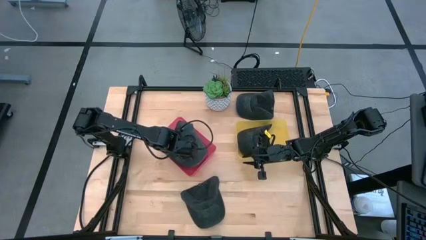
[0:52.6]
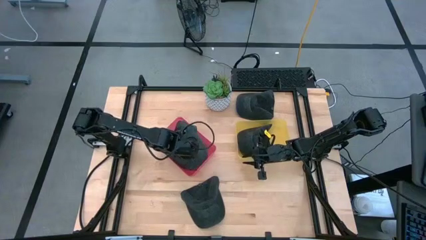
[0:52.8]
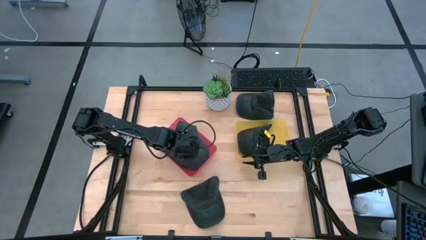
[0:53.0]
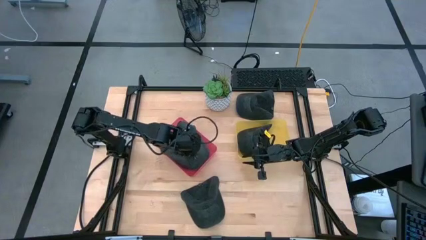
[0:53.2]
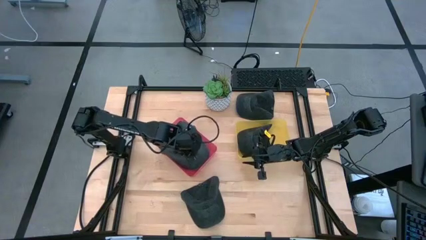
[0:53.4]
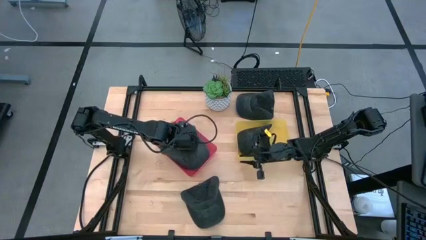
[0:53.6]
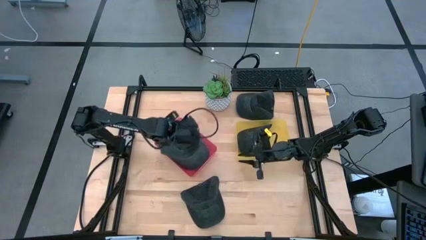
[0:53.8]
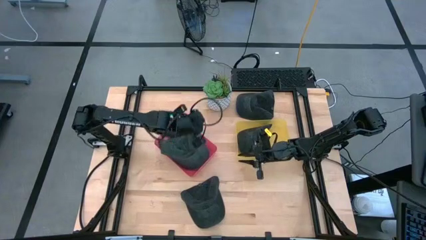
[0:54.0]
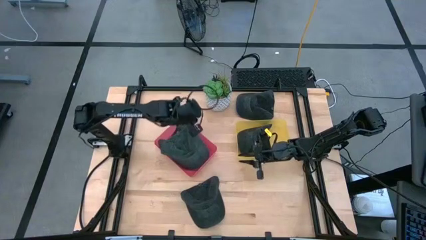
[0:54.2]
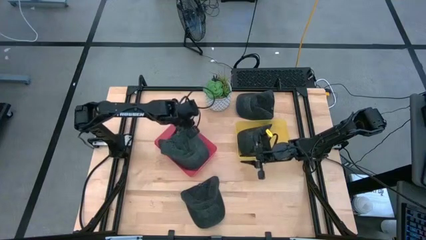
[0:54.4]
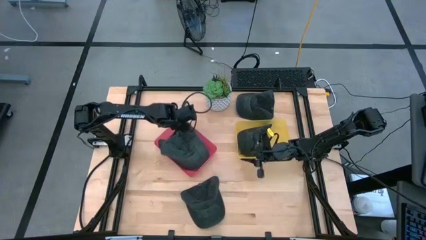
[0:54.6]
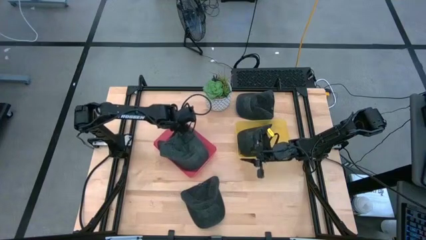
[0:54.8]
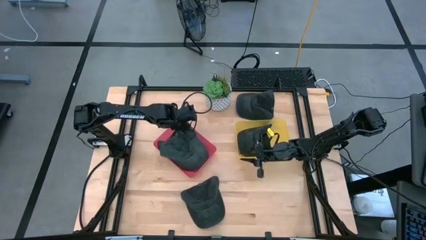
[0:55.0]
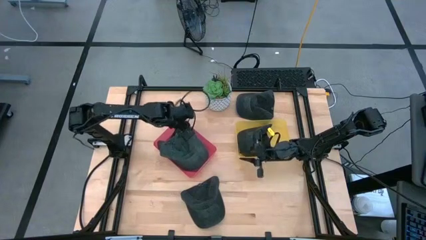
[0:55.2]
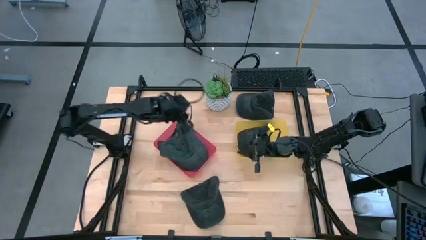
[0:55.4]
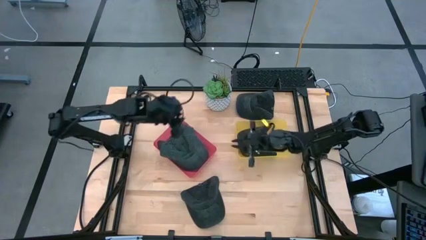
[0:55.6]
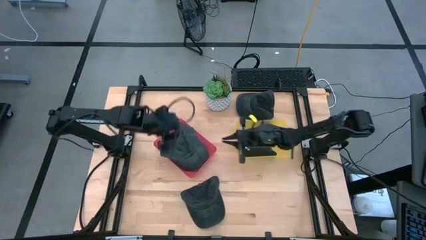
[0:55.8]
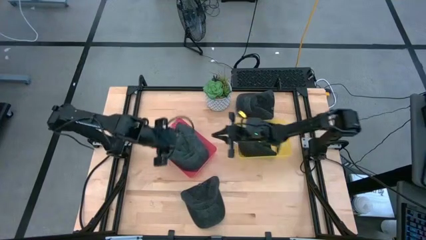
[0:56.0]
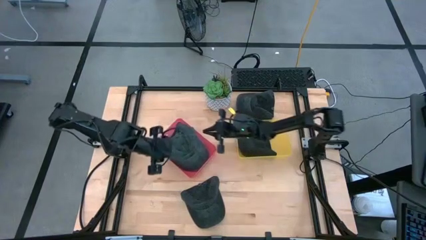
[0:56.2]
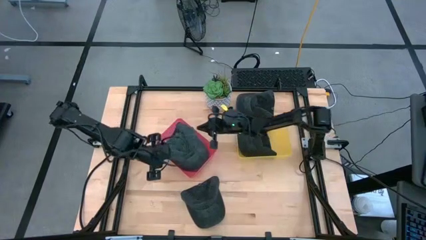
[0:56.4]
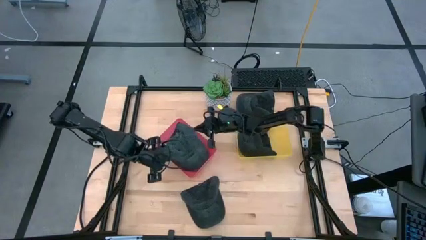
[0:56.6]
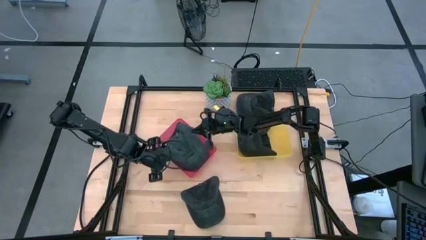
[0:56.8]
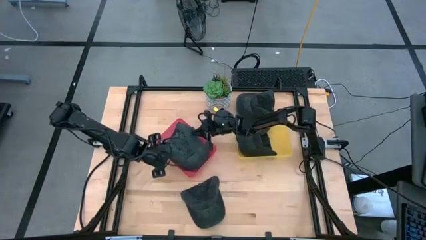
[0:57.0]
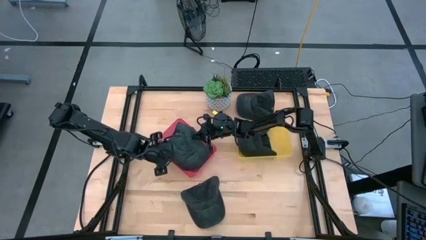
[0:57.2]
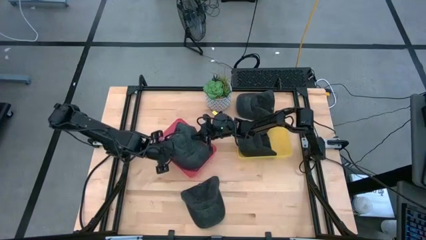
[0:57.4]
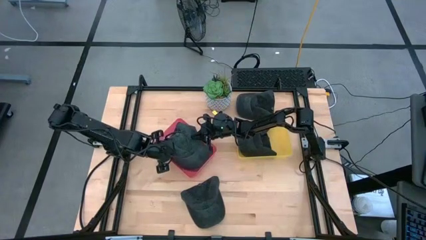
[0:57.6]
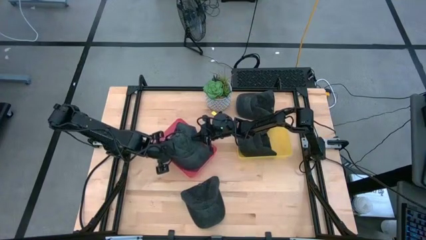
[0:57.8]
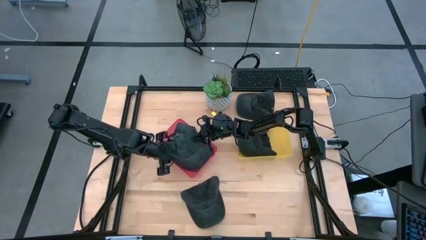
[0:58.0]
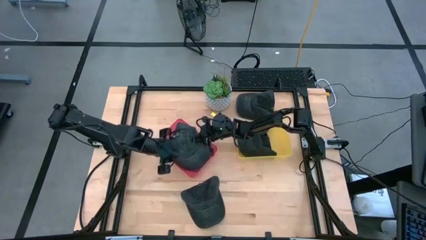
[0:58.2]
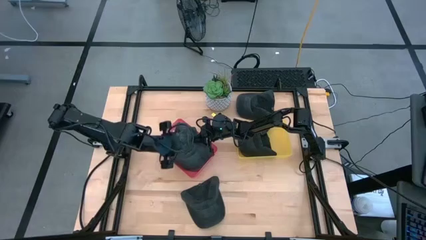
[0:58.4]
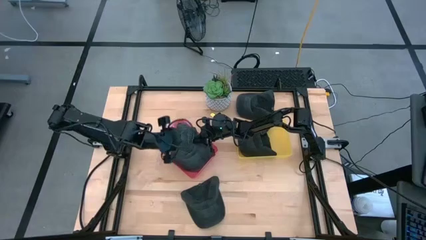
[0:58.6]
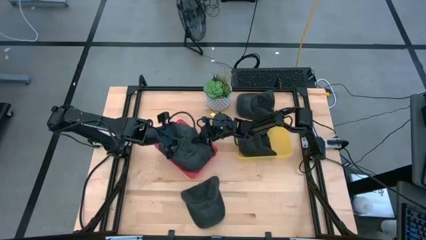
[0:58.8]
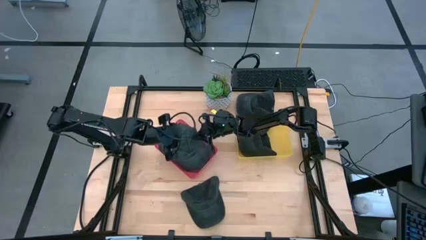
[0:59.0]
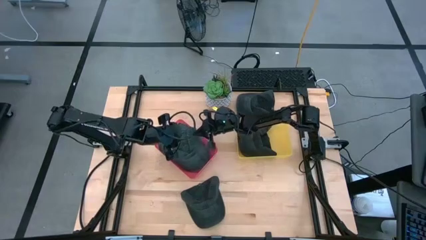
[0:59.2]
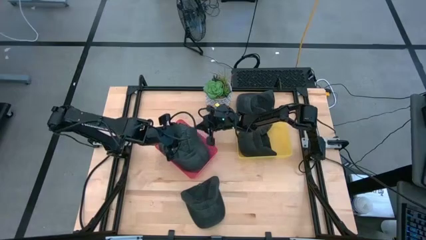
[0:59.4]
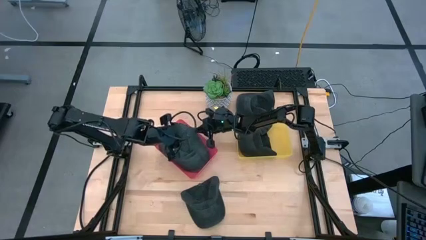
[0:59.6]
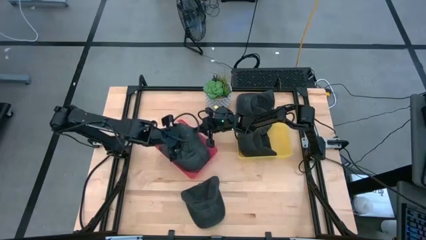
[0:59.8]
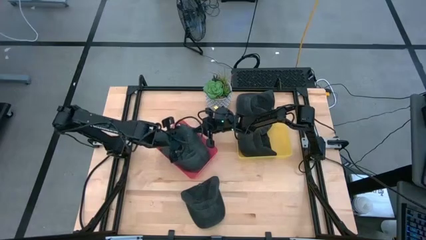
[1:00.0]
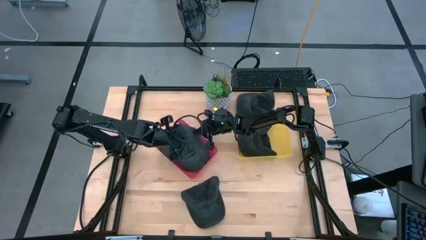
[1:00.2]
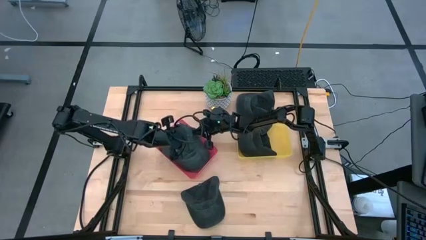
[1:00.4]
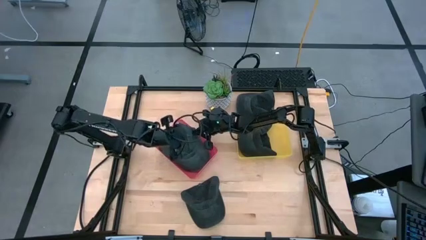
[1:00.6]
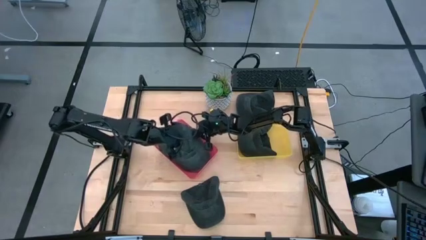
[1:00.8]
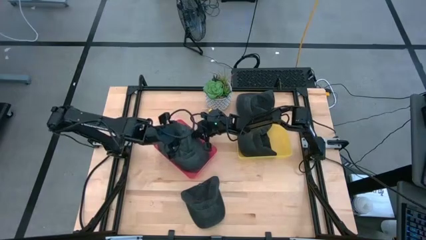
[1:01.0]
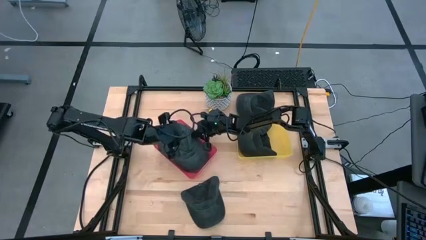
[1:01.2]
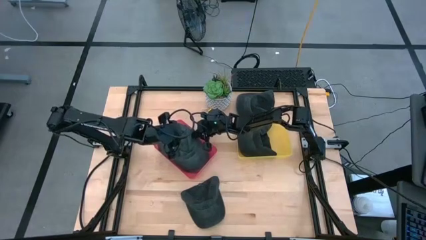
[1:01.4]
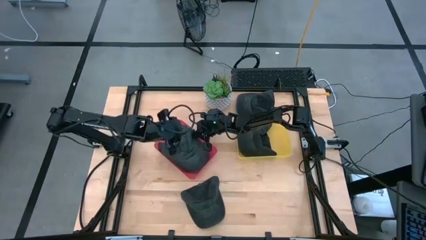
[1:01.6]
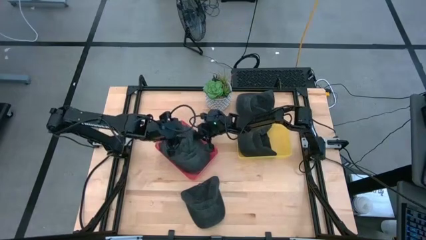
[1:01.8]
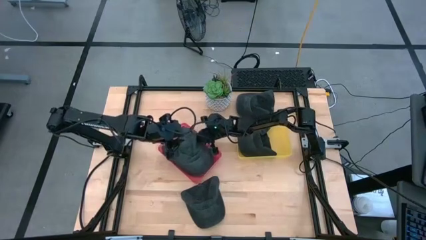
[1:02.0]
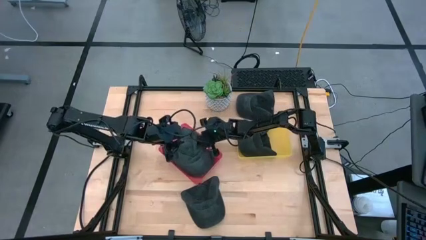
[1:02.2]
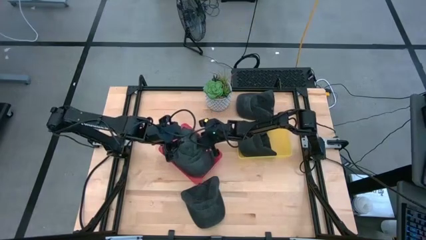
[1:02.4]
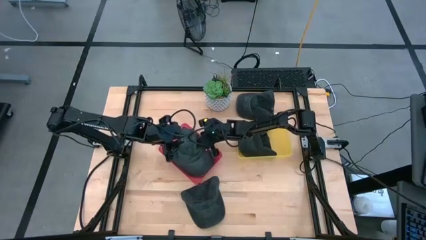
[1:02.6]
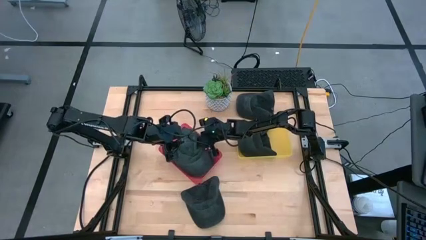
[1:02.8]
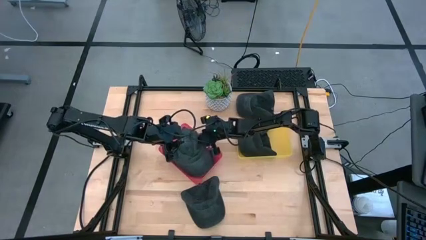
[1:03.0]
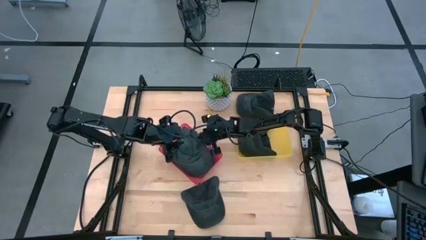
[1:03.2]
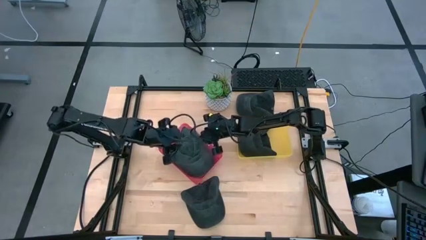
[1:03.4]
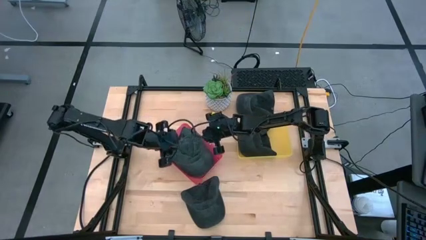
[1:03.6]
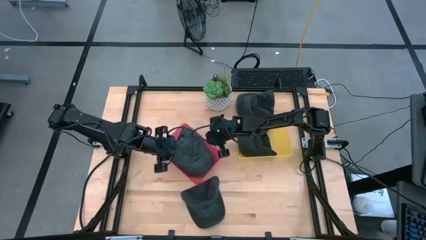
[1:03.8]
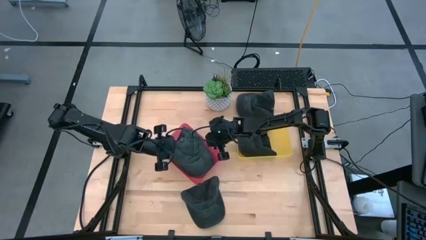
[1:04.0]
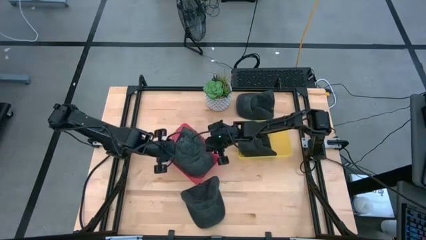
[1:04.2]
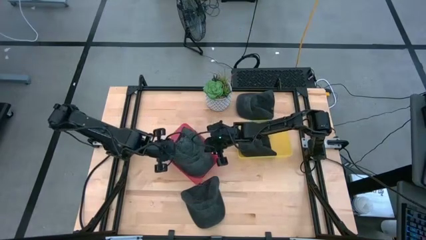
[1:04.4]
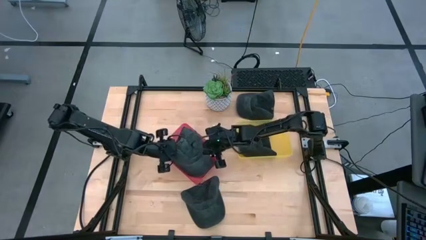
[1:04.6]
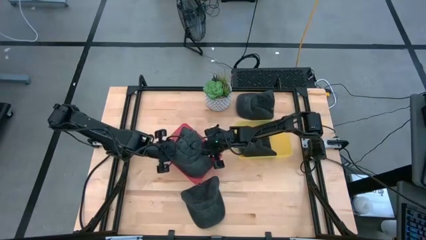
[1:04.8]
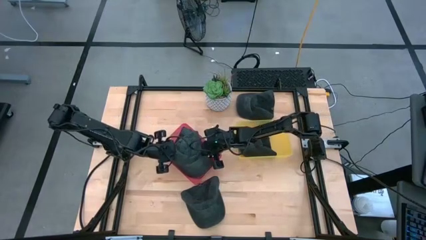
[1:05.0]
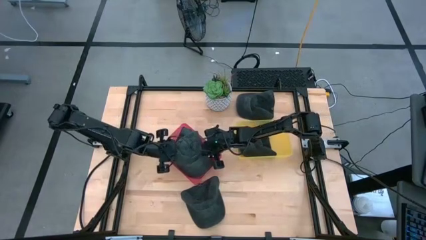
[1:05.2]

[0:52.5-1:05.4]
Task: Pick & Place hat
Put the dark gray cap into the red bin

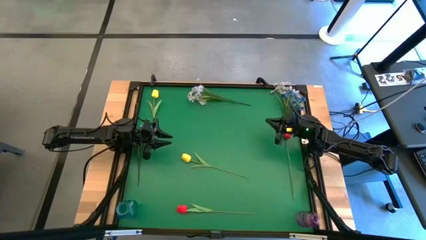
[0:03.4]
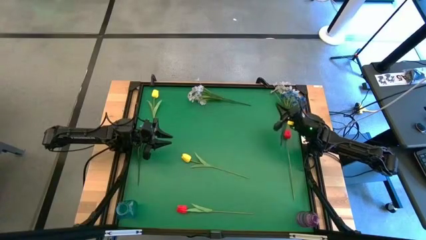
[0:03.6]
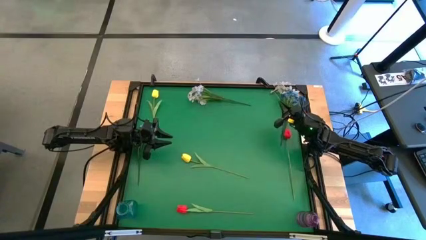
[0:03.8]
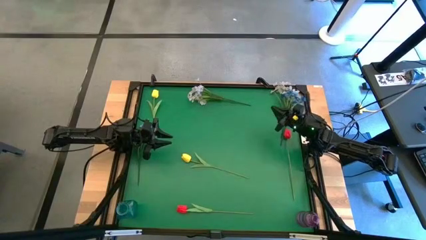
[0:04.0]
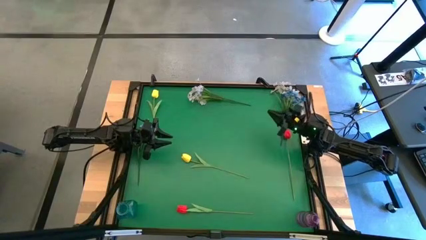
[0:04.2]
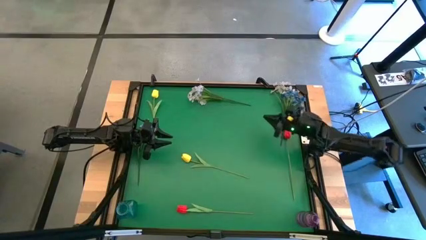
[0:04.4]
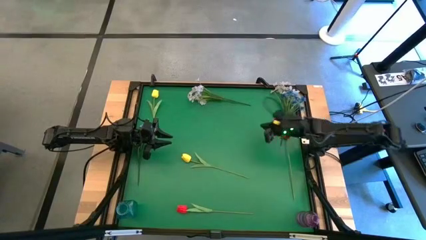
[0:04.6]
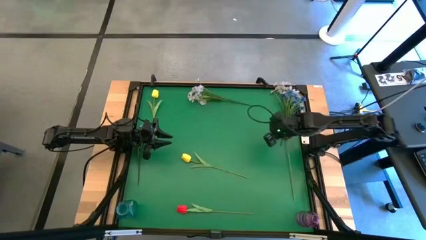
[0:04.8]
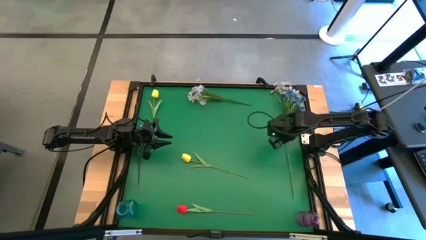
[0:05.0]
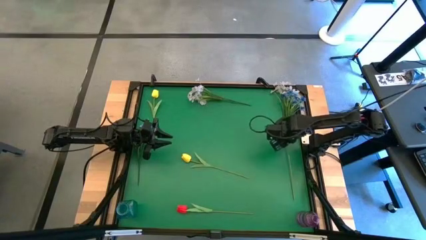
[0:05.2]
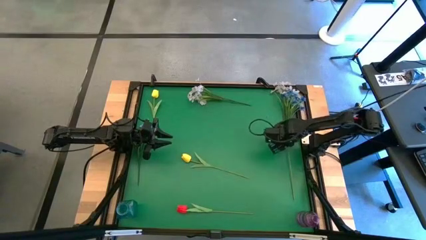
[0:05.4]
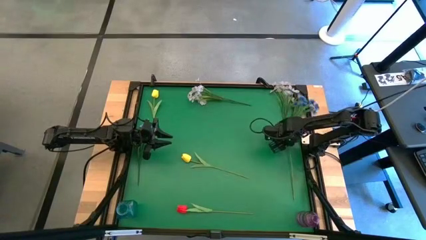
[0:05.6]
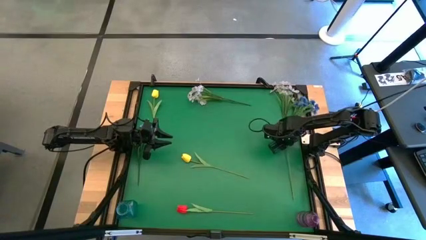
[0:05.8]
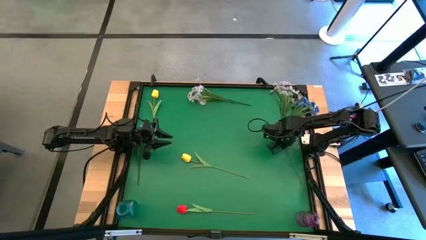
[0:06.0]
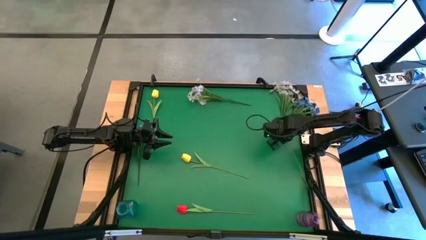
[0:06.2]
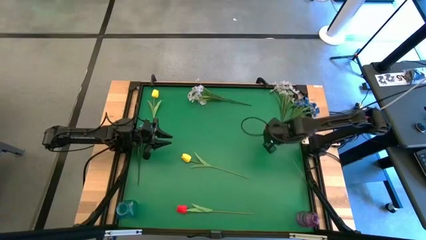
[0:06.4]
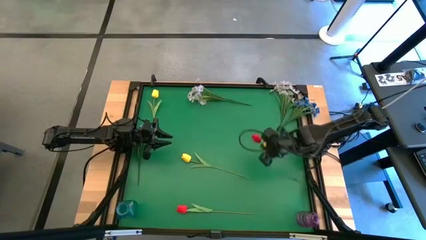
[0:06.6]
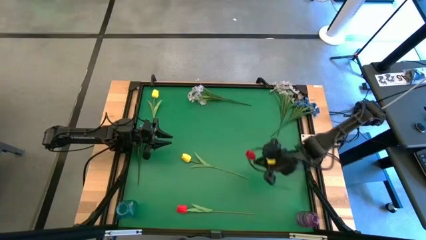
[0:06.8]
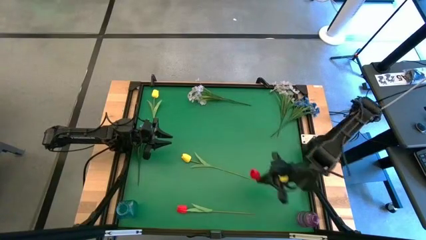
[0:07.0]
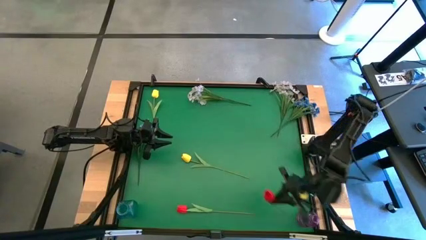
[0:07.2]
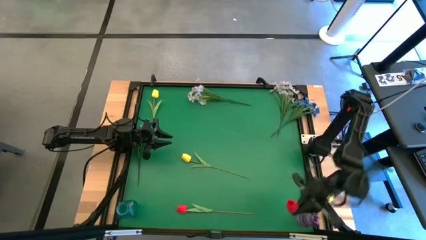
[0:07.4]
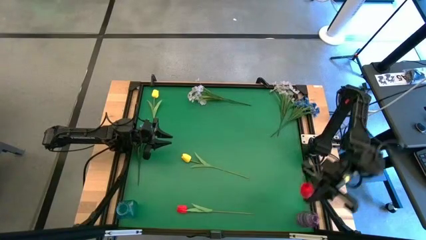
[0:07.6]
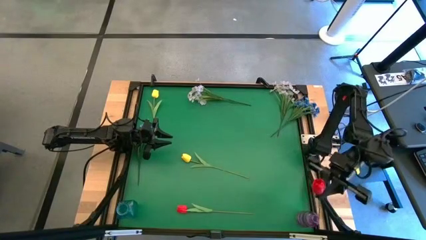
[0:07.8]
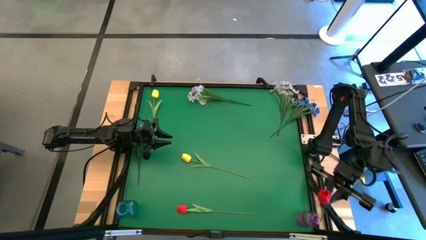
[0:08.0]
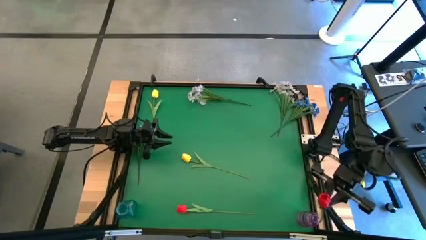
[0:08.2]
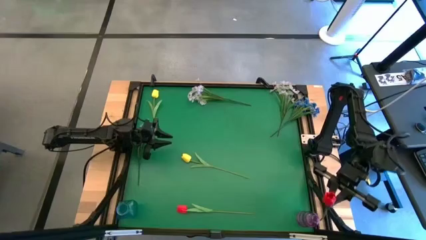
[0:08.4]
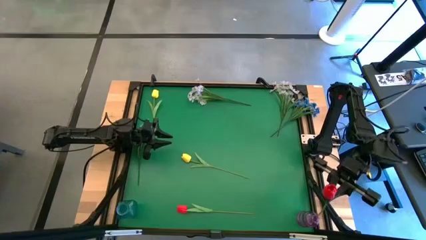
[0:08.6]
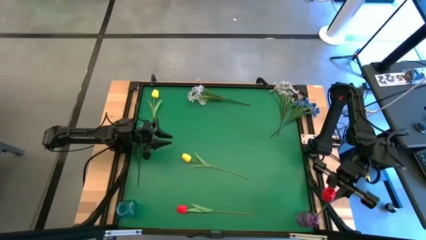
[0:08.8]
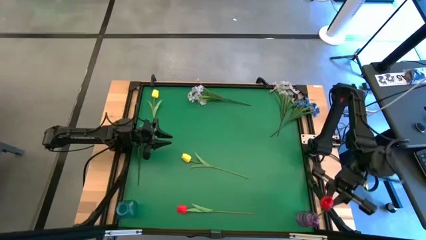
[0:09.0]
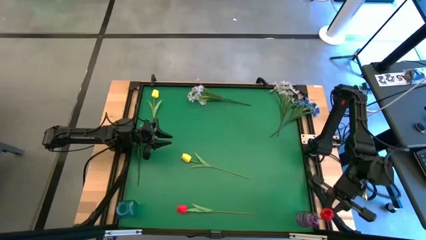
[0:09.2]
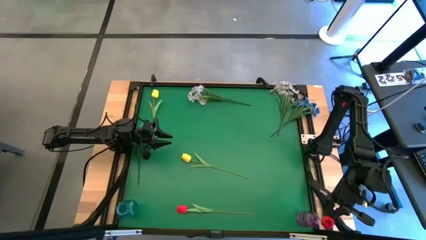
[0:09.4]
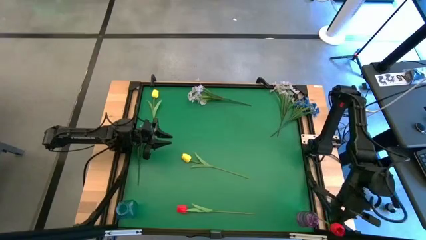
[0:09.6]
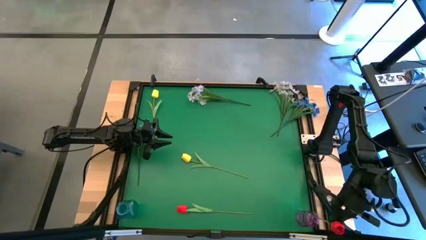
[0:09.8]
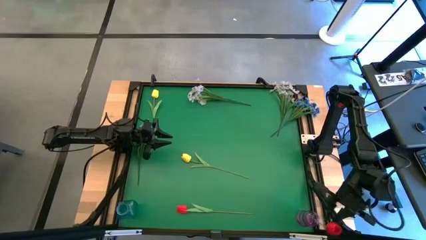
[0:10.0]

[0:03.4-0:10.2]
Task: Sort flowers into vase by color
Put the top red flower into the purple vase
